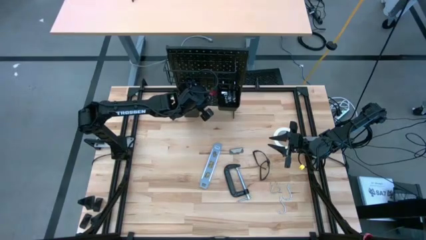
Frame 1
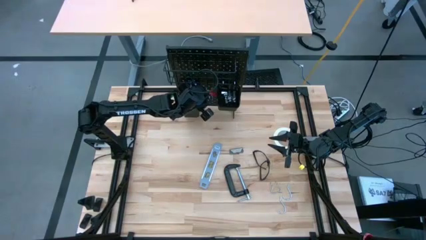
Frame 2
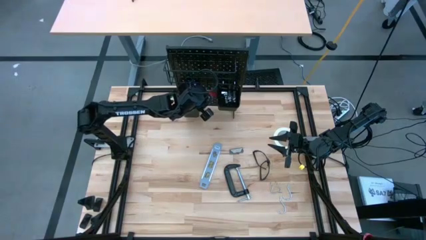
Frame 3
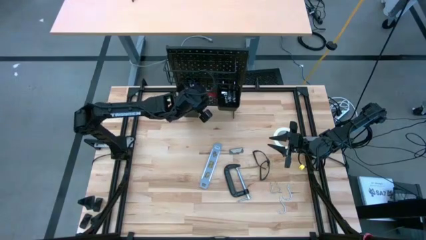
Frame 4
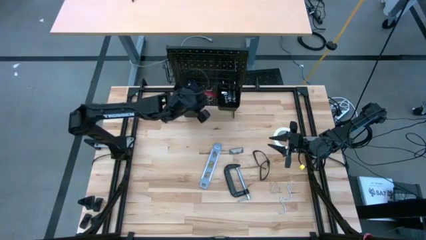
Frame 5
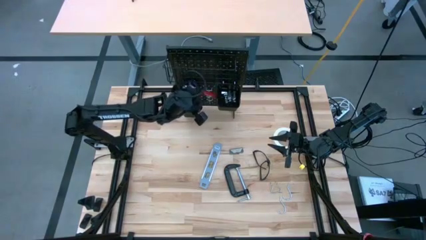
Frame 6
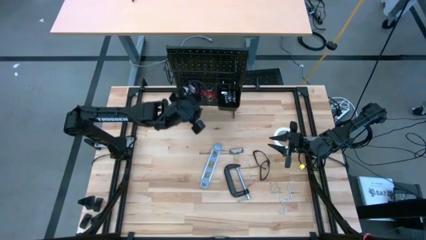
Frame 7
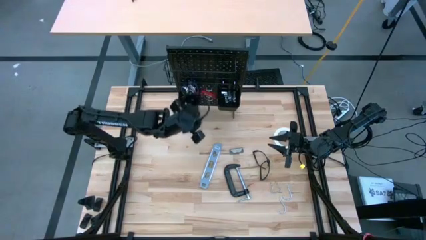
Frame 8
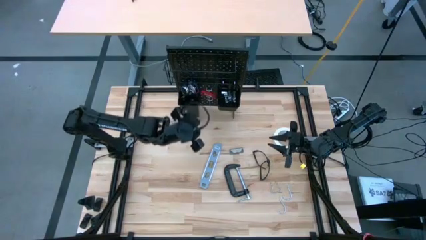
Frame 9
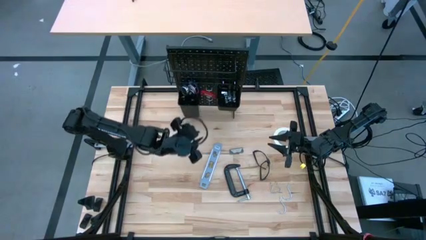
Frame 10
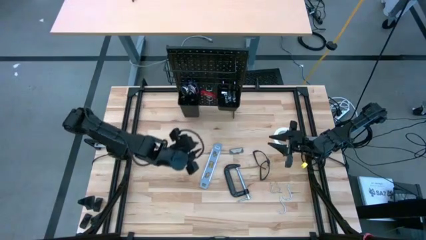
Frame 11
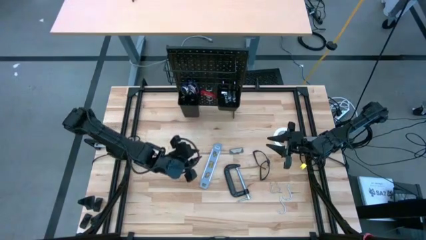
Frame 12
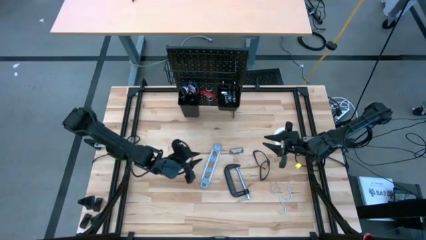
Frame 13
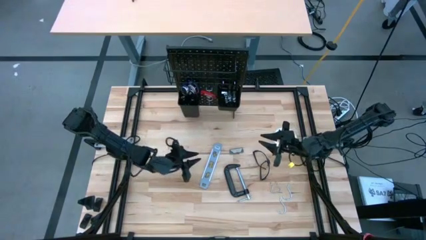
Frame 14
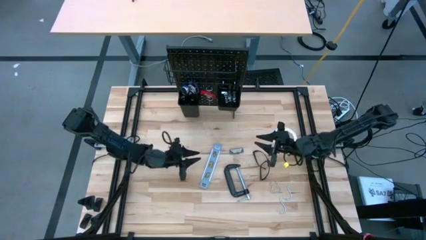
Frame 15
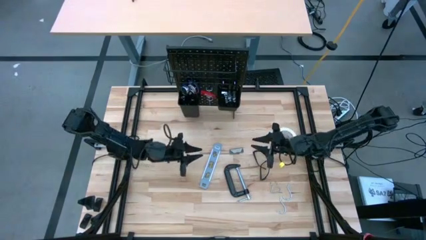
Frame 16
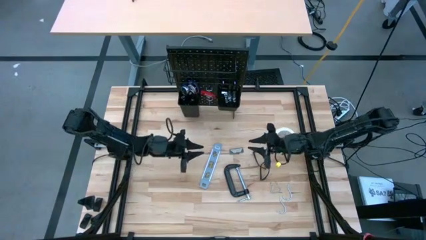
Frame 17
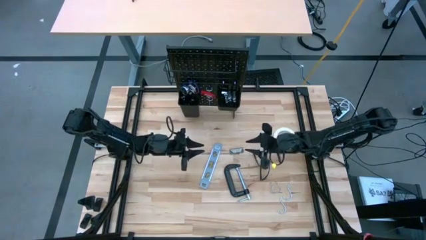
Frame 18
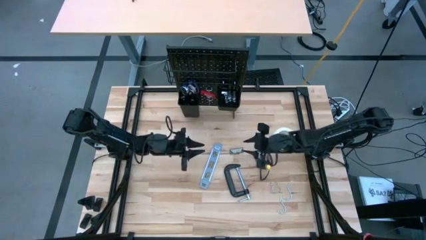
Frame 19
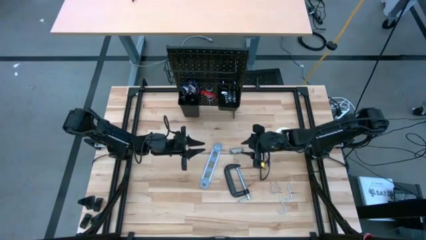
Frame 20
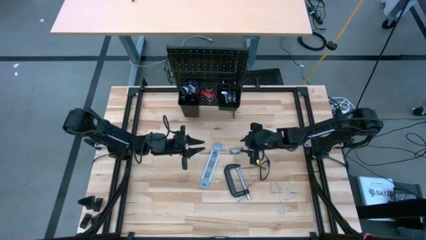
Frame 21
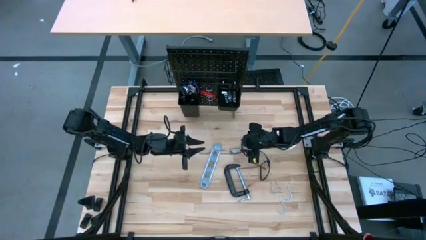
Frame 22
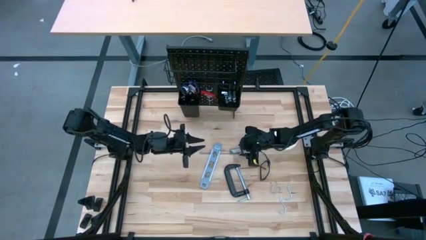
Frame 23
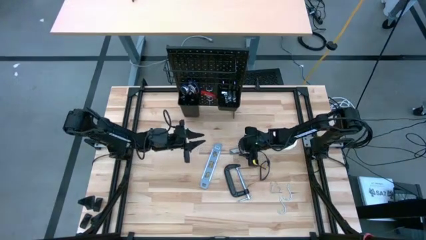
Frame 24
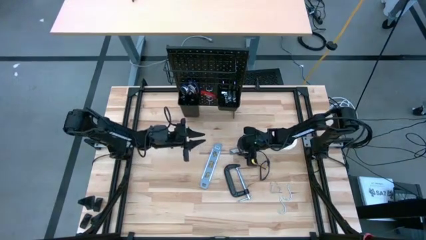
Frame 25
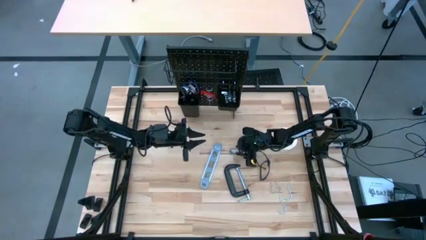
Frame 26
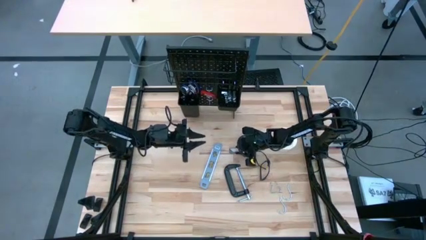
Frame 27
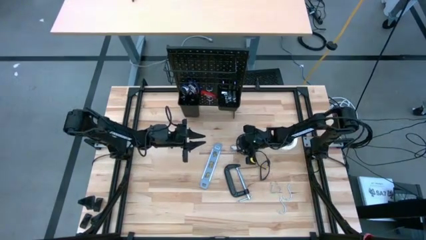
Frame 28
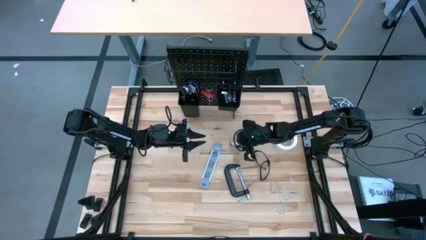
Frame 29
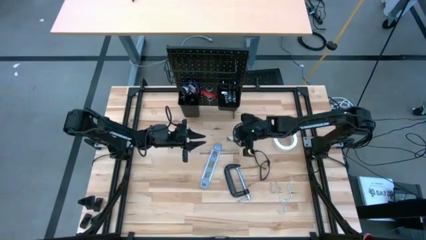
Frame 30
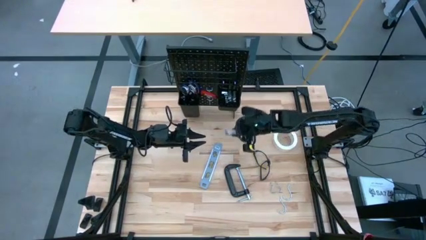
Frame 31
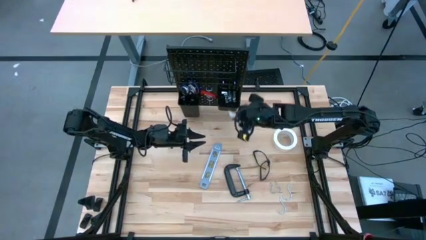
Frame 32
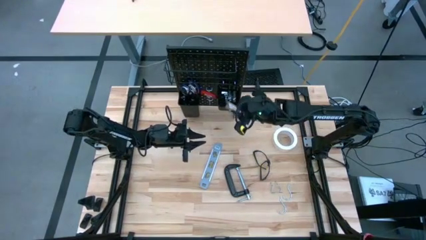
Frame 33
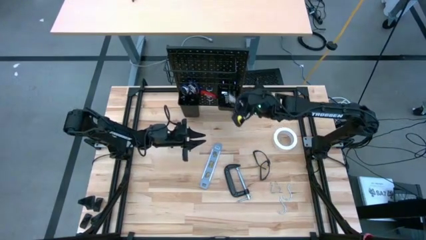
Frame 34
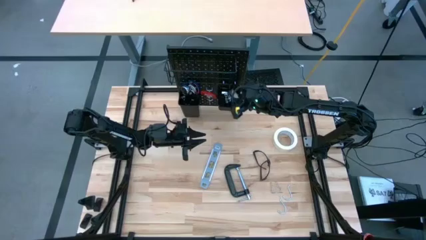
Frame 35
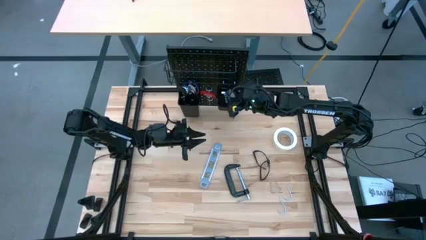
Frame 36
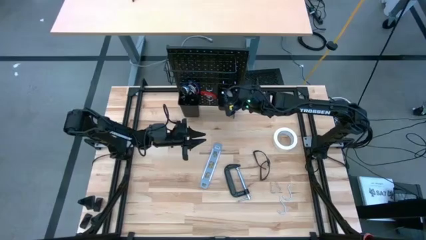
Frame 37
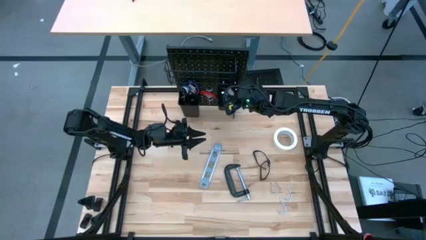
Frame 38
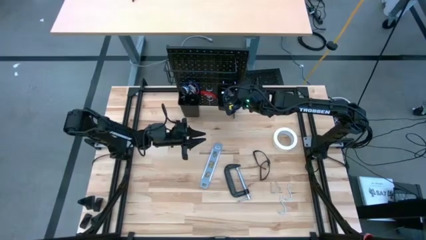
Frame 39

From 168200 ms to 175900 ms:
Task: Hang tools onto peg board
Put the cutter blades box into the right black bin on the peg board

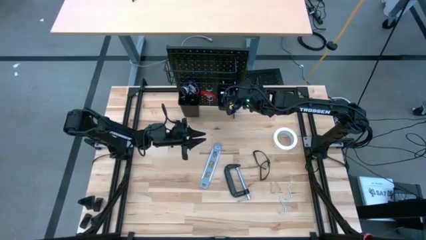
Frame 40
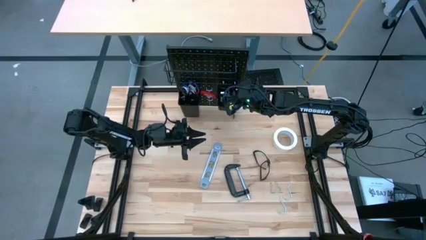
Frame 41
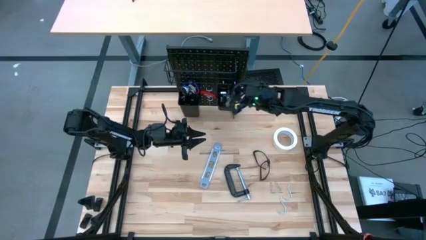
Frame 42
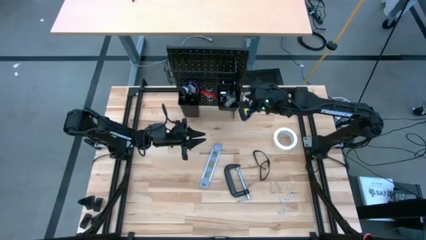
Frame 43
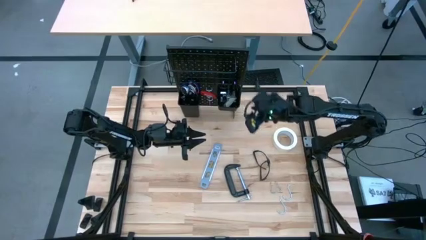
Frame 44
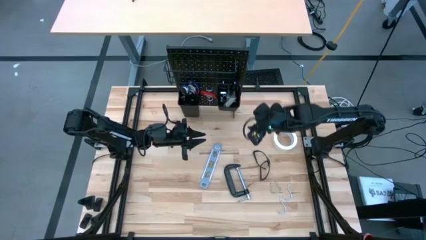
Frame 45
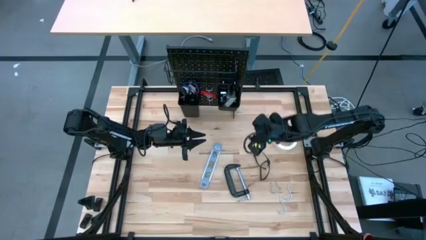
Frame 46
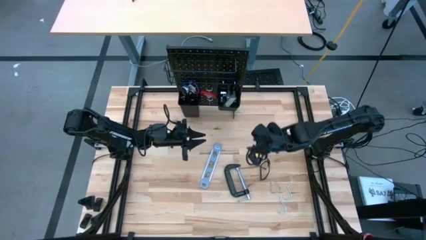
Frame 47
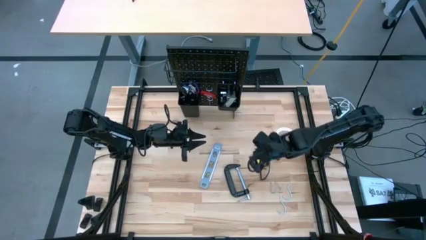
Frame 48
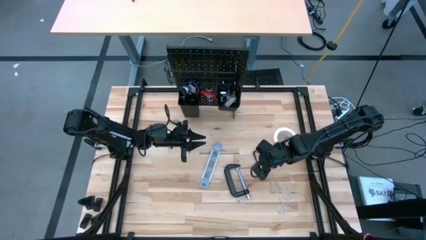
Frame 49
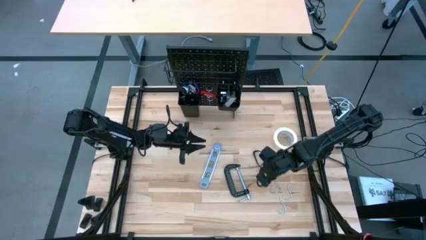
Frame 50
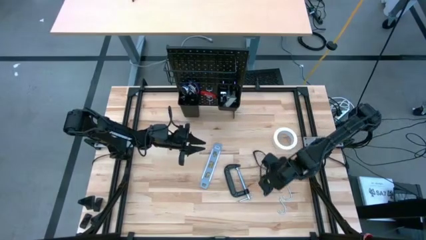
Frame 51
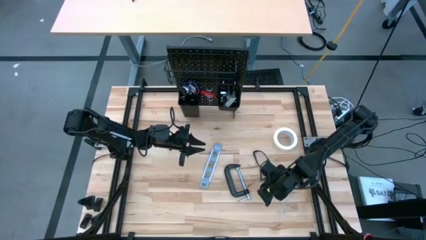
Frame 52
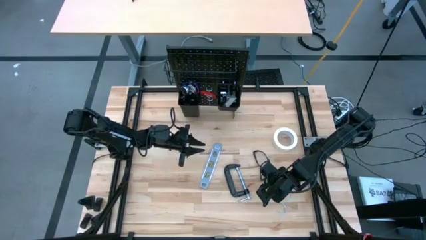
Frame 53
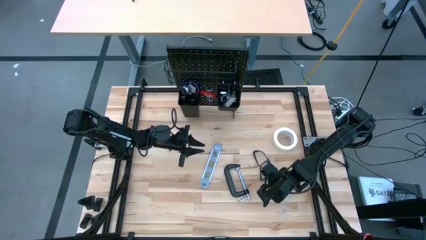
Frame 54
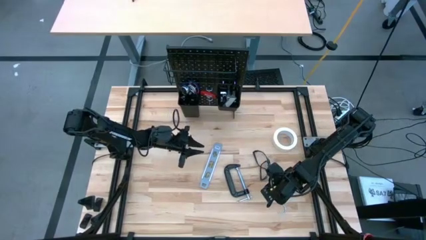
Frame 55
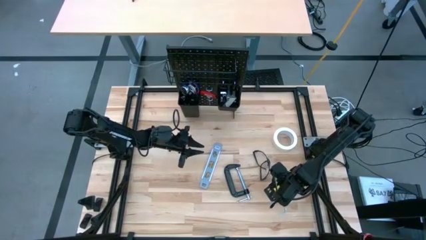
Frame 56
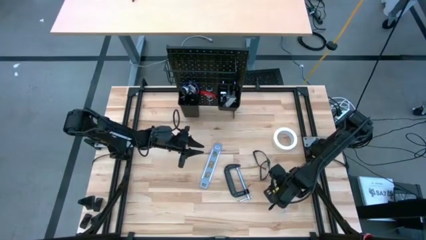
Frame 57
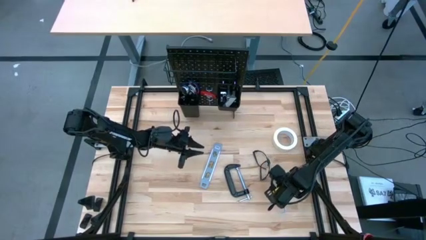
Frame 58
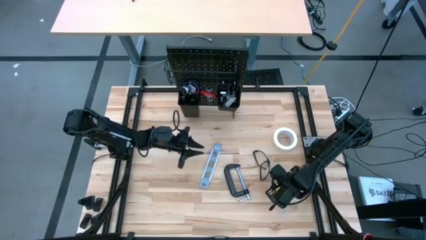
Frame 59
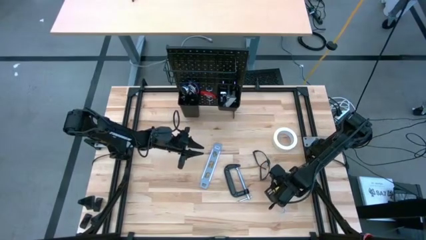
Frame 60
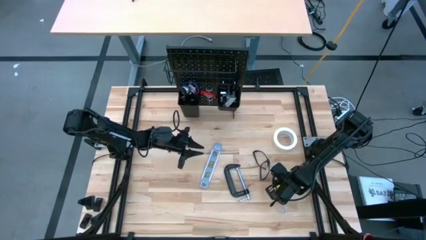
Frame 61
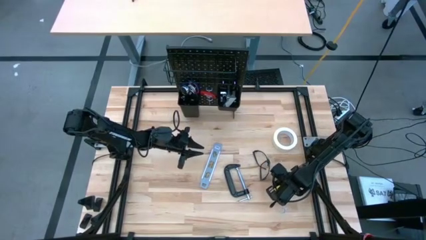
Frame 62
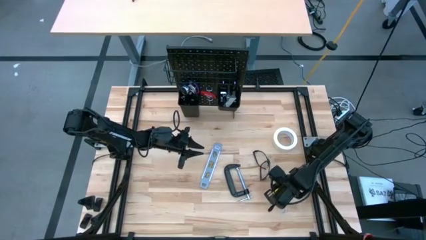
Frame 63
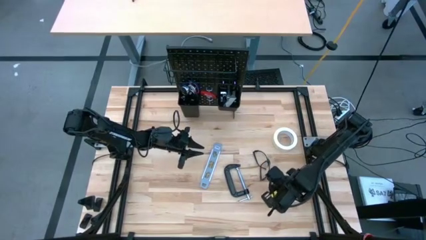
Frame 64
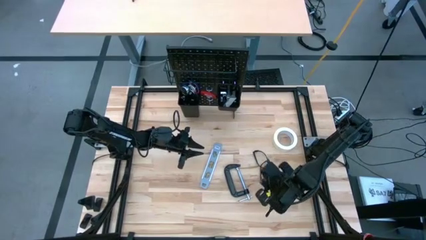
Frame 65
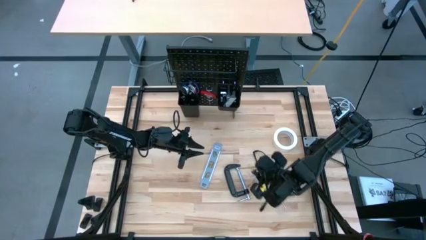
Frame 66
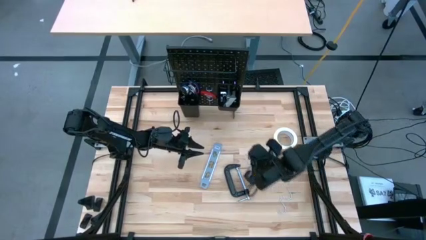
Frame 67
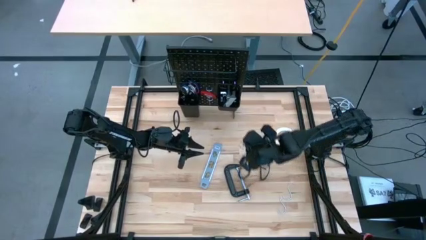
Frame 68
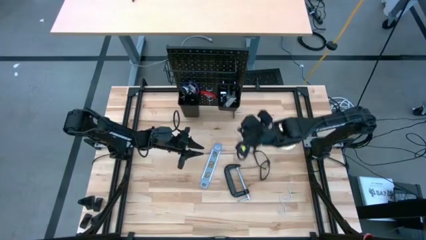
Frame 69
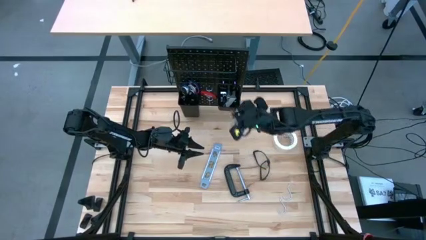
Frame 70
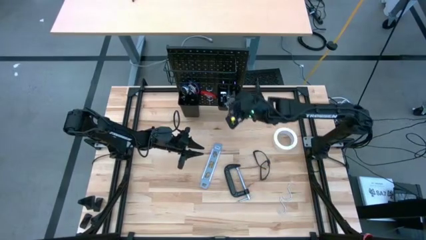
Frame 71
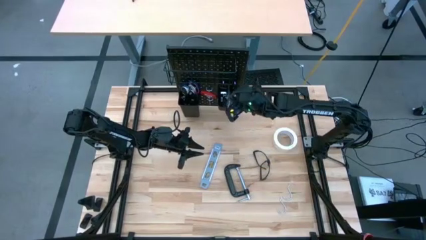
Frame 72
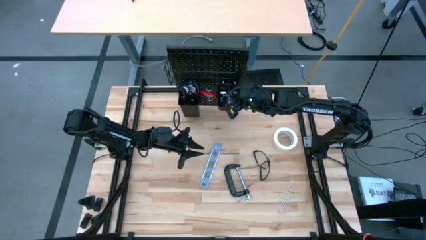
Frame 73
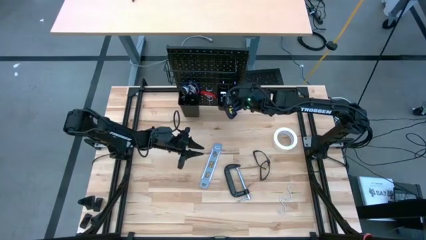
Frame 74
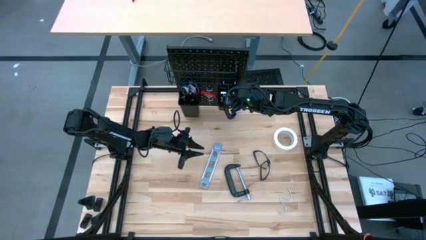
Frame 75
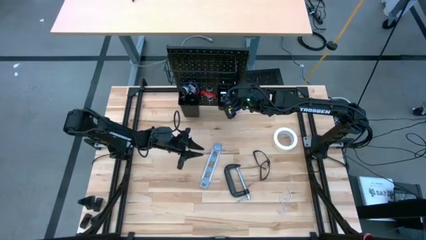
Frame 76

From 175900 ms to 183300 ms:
Put the top pegboard hook into the right black bin on the peg board
